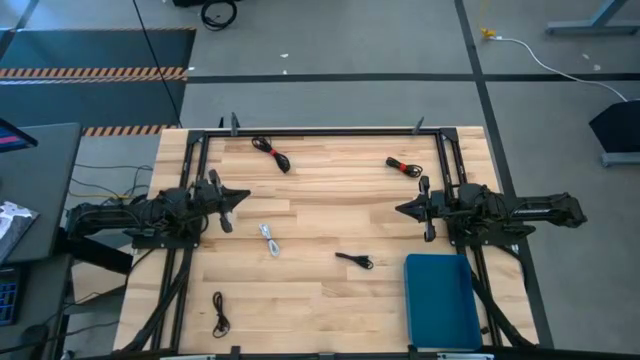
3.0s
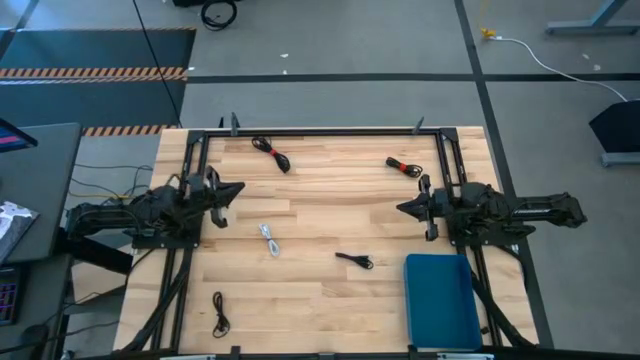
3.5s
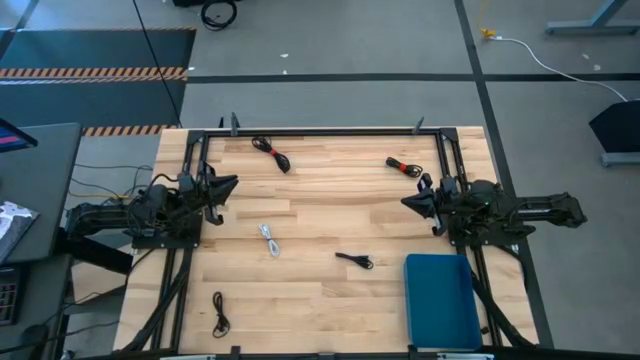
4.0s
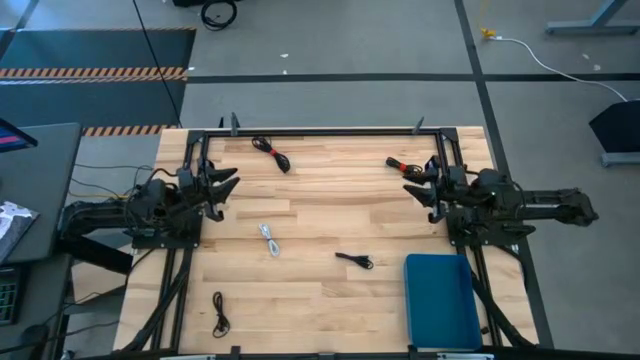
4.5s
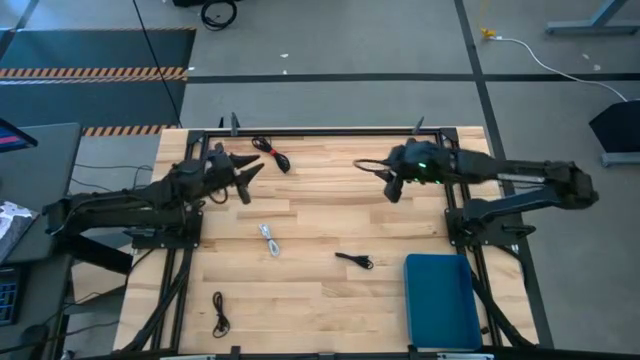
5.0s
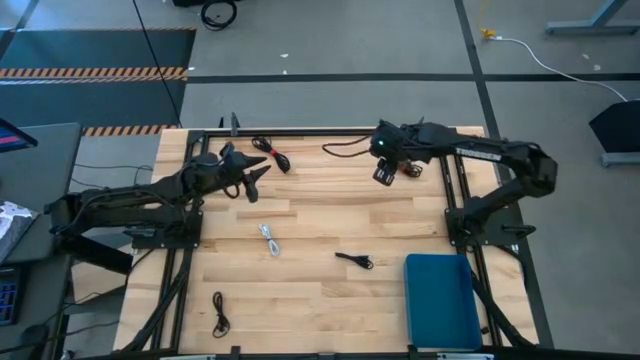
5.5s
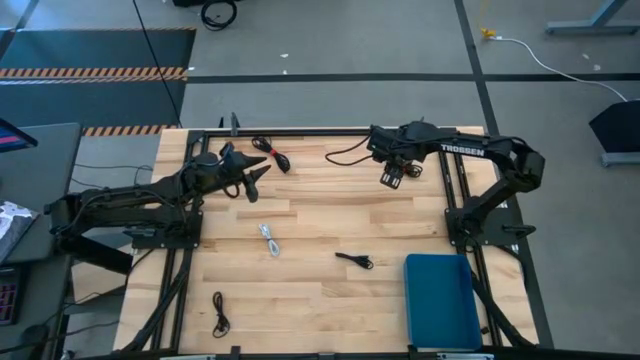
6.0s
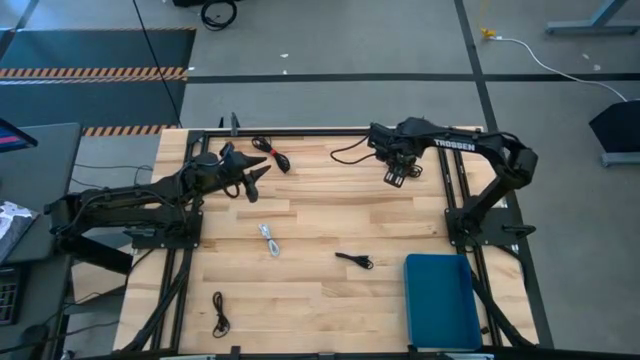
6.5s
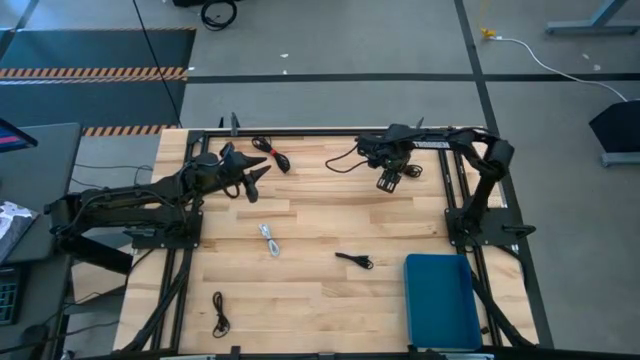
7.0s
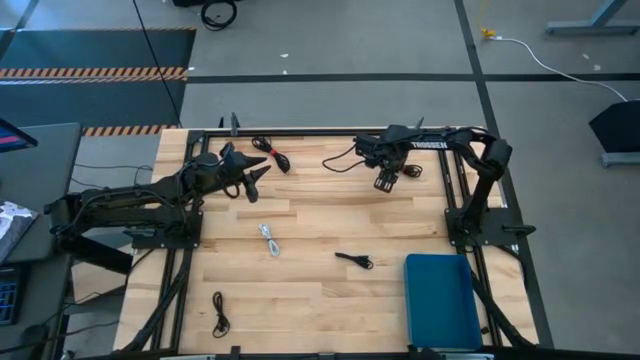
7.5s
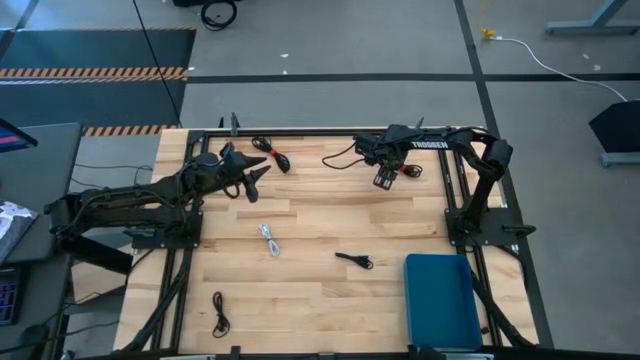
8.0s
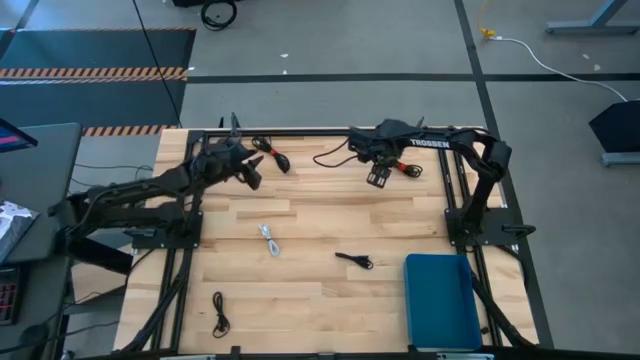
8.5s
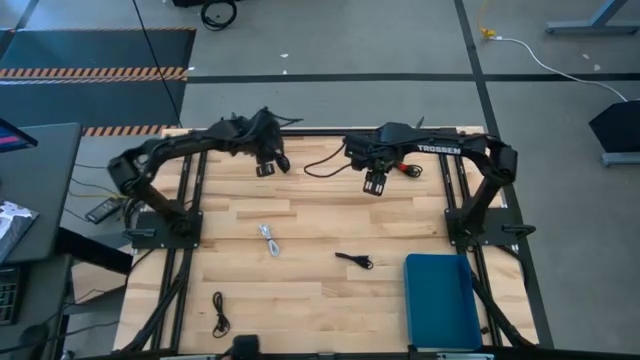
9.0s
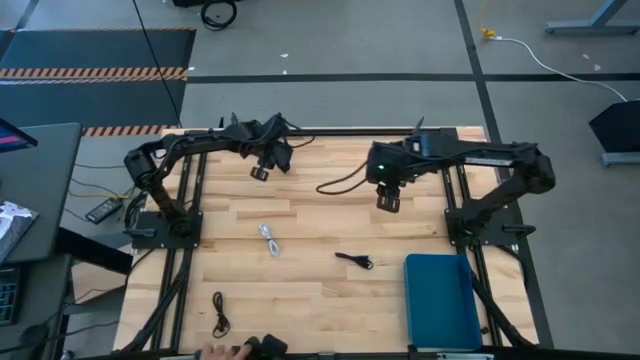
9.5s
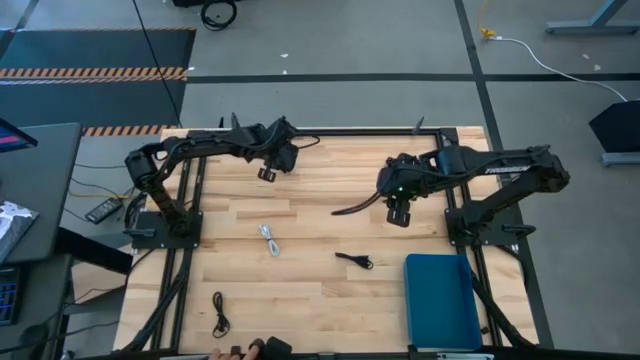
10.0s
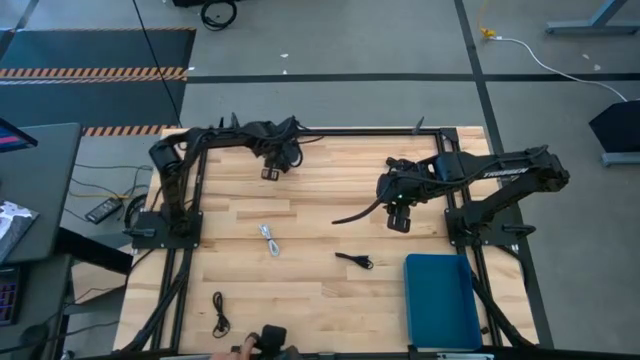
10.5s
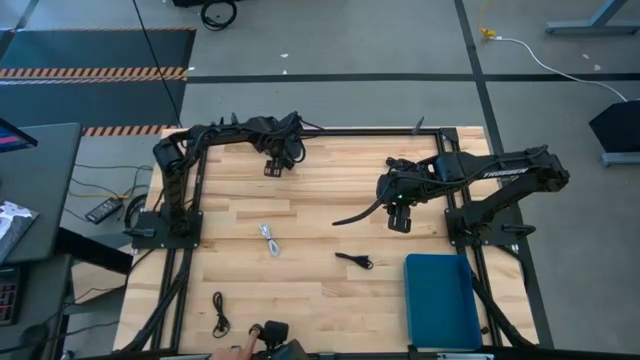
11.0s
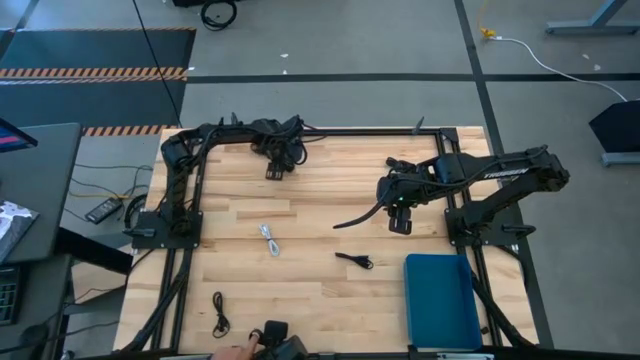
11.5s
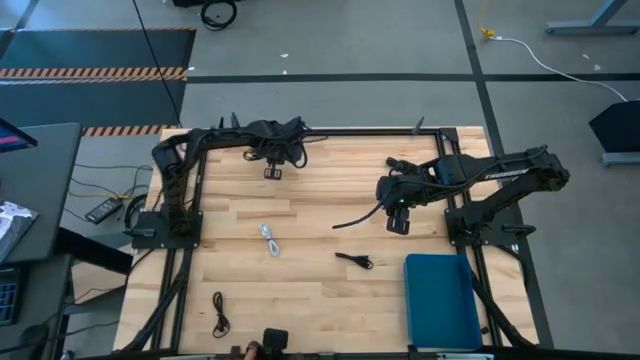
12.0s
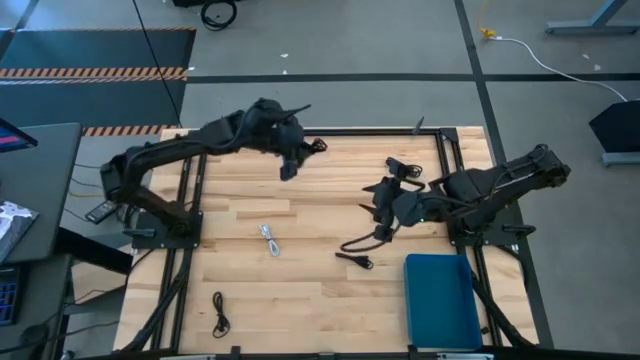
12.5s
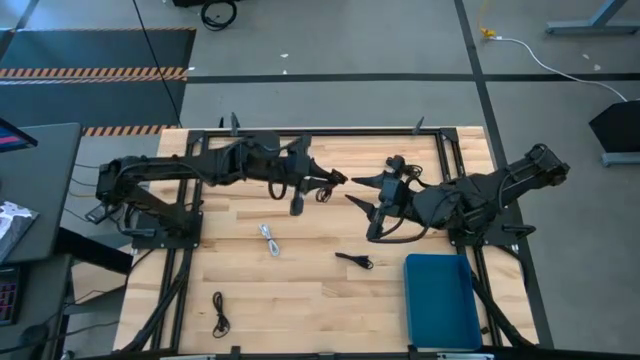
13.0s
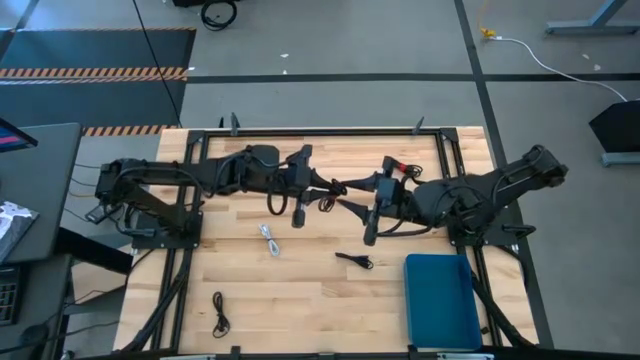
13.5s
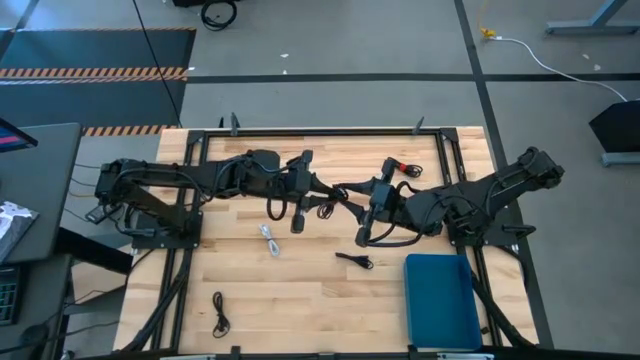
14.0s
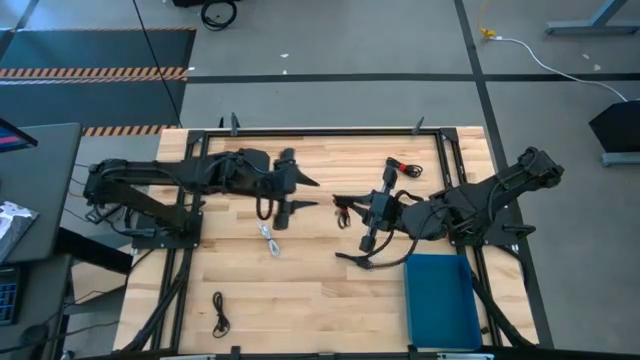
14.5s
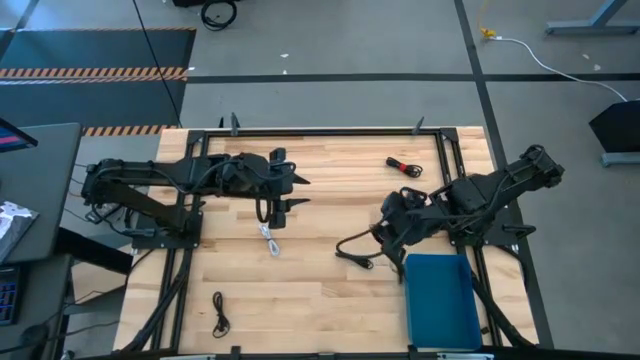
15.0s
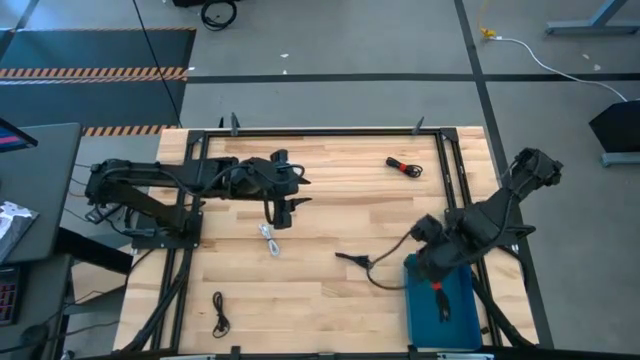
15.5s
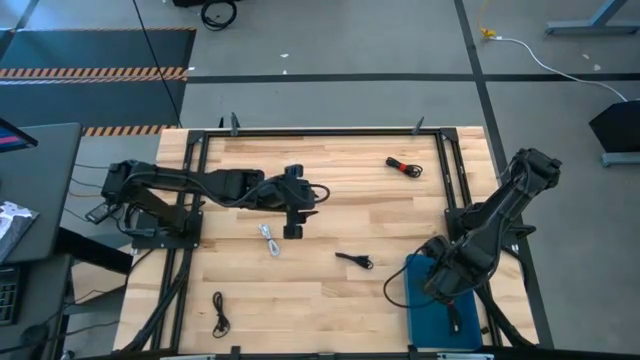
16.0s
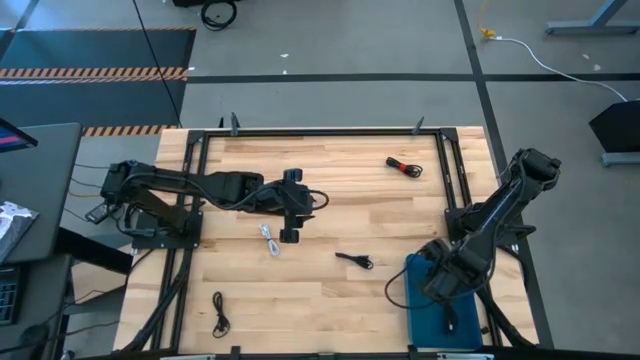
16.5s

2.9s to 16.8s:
Task: Pick and place USB-C Cables
Put the black USB cable into the blue bin

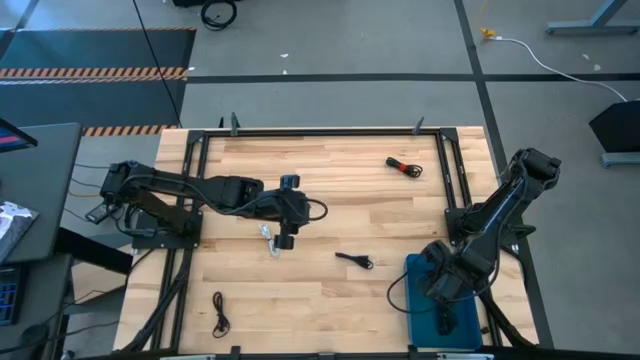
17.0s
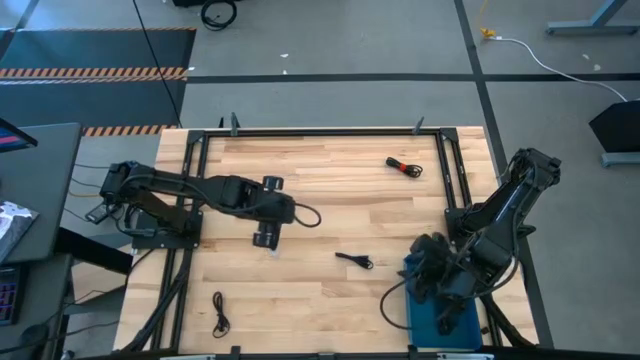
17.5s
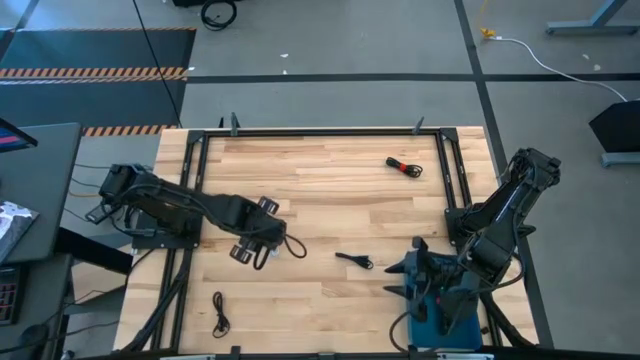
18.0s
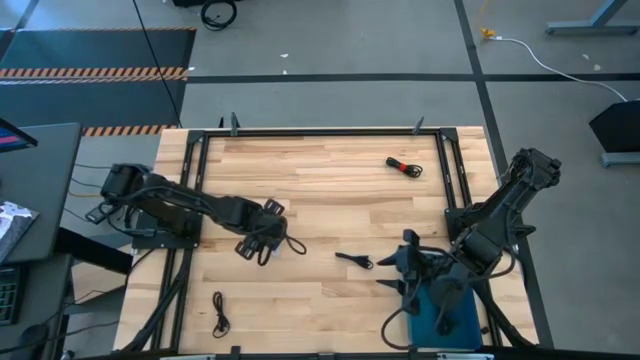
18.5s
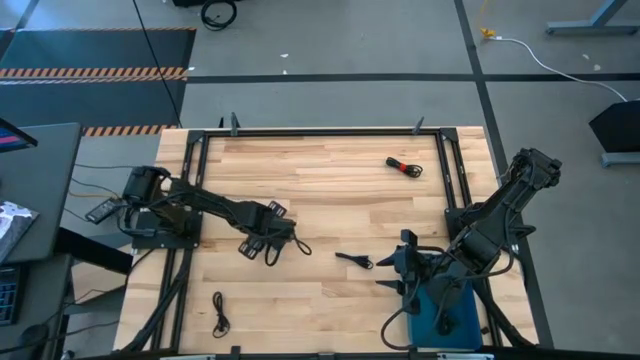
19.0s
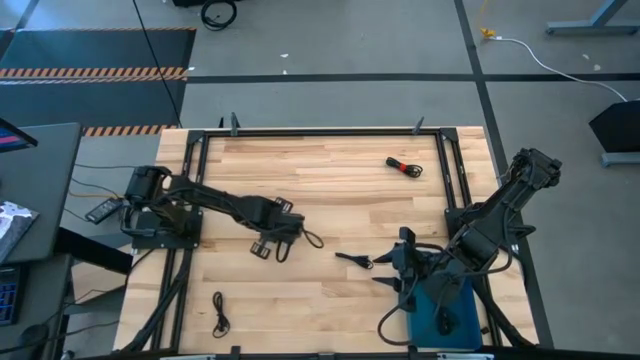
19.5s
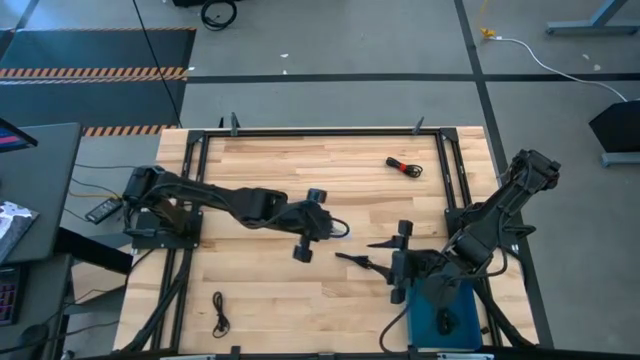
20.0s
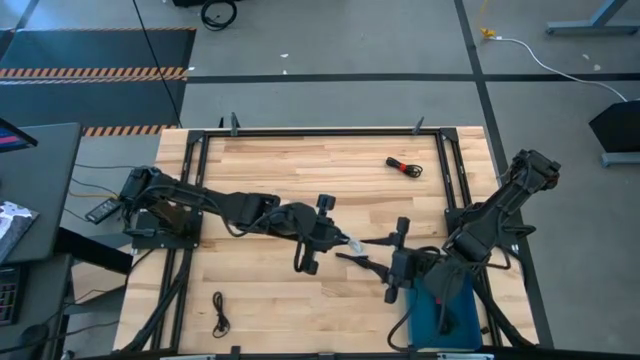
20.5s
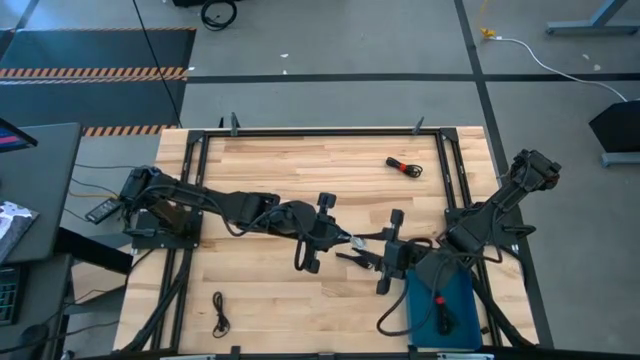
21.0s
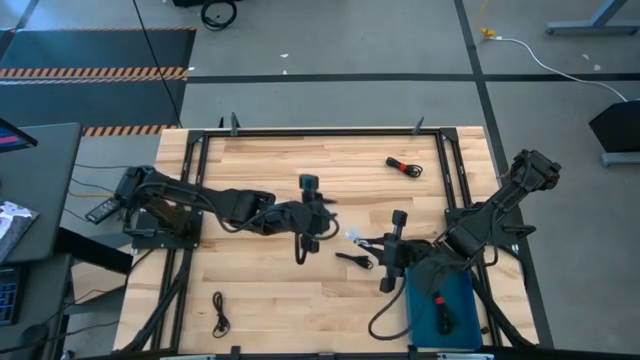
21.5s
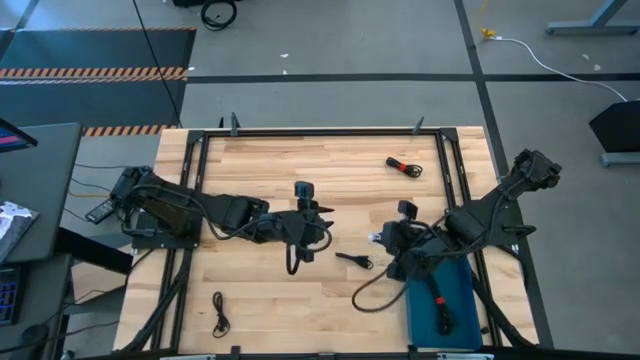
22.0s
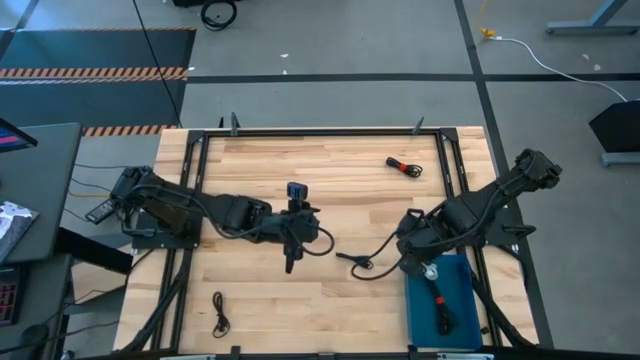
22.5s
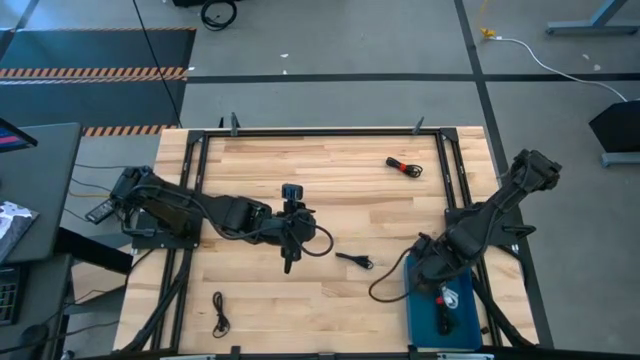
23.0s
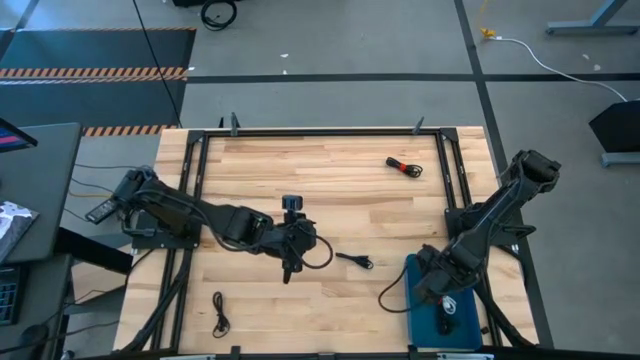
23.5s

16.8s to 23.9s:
Put the white USB cable on the blue bin
